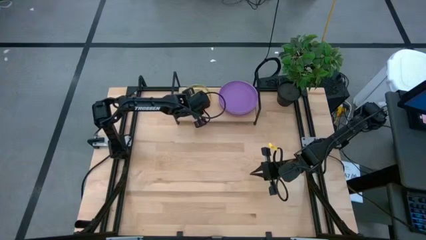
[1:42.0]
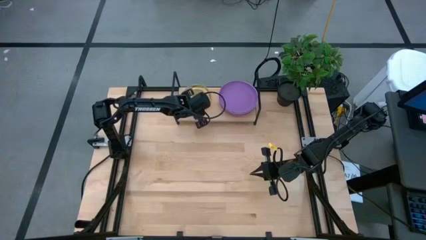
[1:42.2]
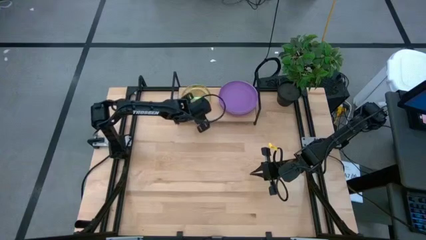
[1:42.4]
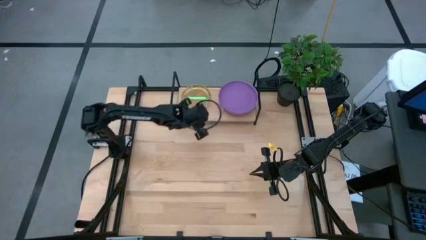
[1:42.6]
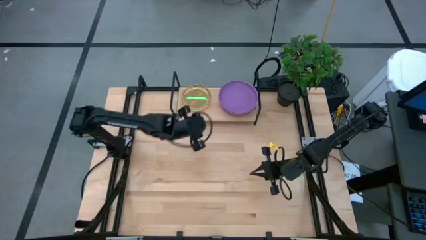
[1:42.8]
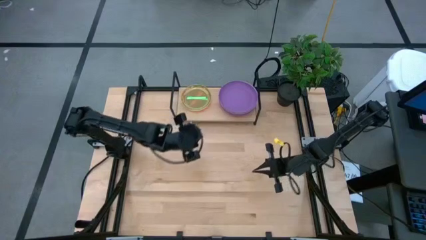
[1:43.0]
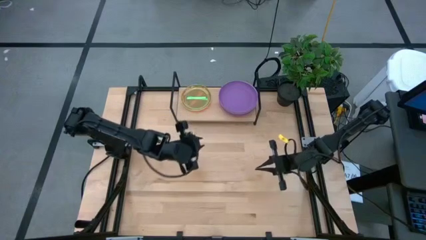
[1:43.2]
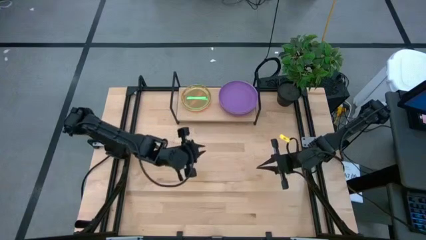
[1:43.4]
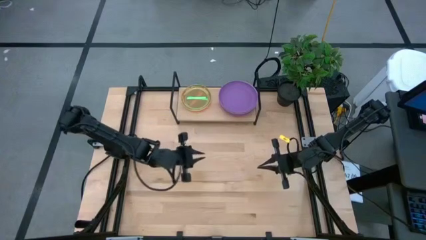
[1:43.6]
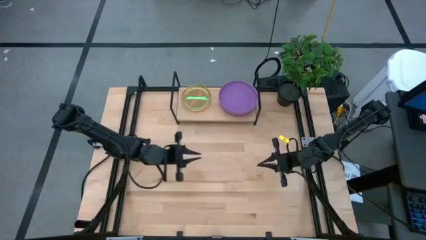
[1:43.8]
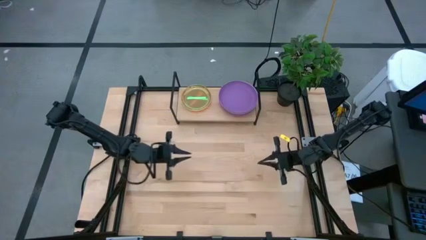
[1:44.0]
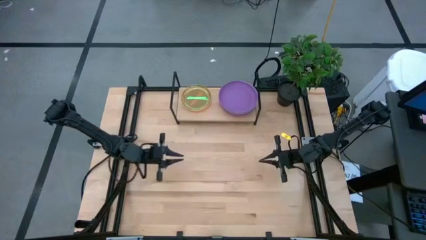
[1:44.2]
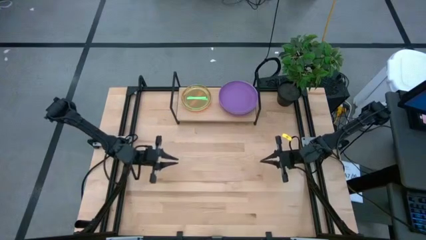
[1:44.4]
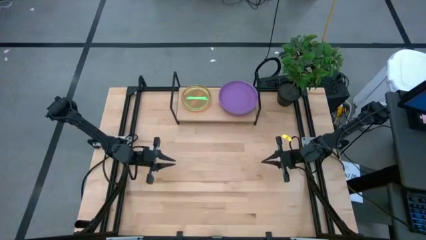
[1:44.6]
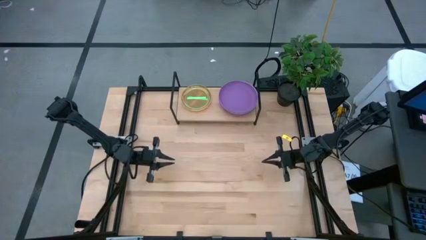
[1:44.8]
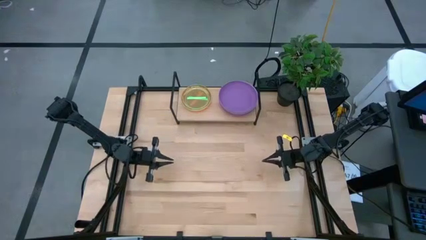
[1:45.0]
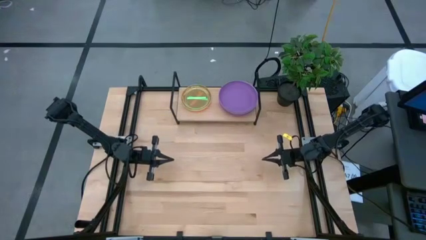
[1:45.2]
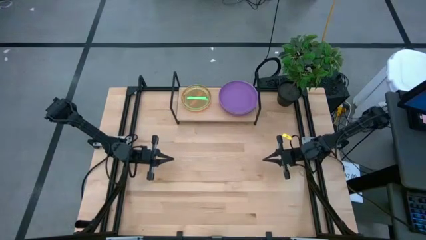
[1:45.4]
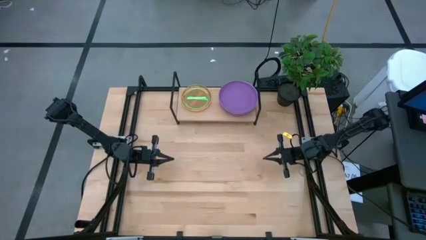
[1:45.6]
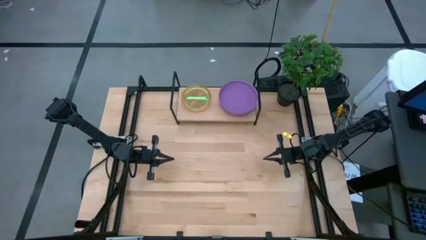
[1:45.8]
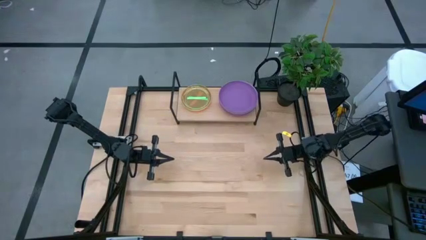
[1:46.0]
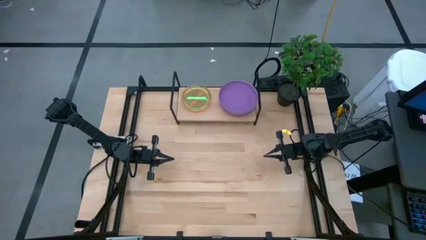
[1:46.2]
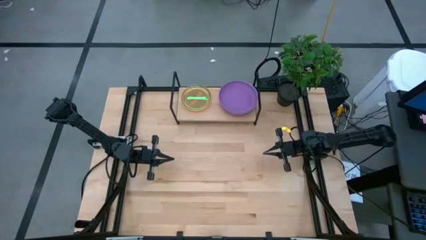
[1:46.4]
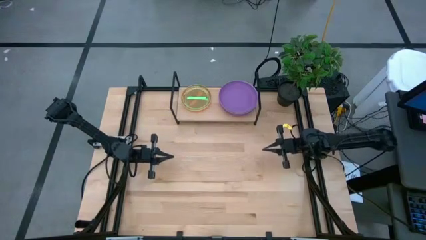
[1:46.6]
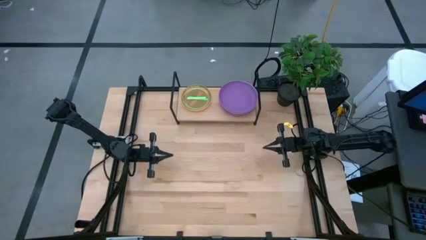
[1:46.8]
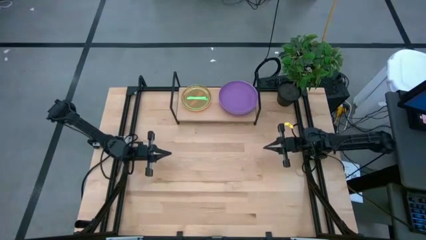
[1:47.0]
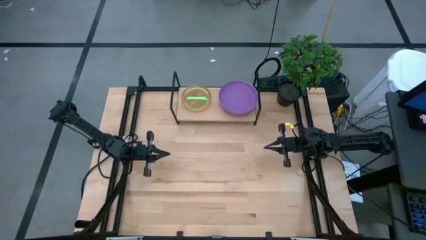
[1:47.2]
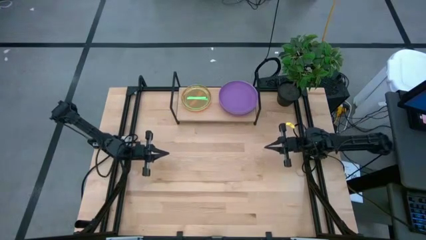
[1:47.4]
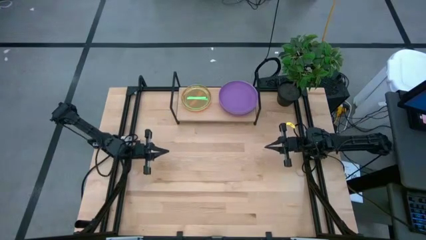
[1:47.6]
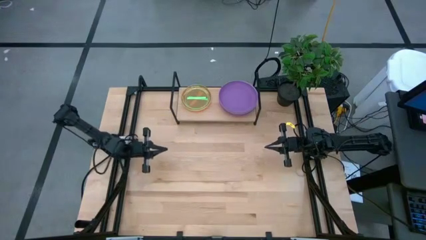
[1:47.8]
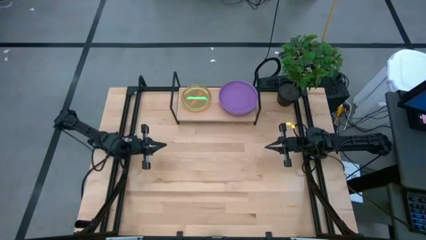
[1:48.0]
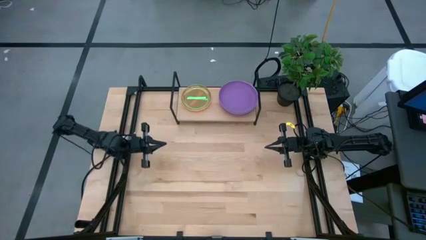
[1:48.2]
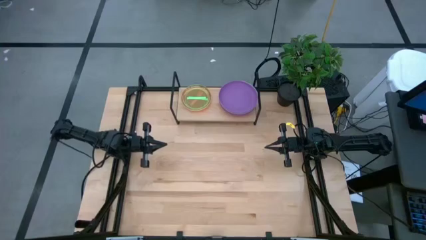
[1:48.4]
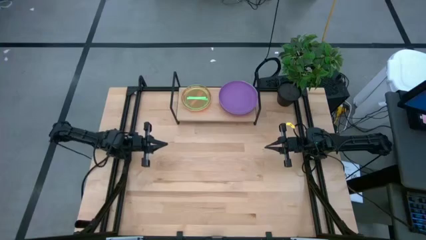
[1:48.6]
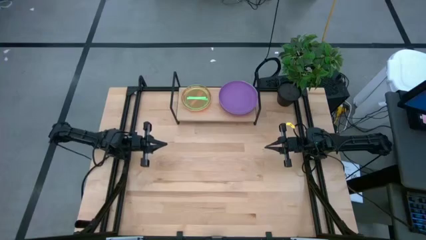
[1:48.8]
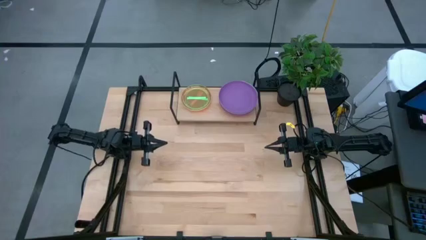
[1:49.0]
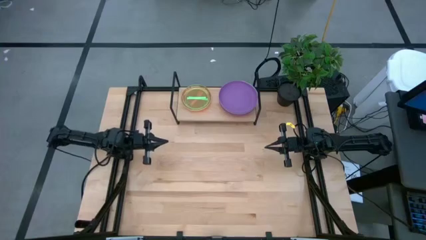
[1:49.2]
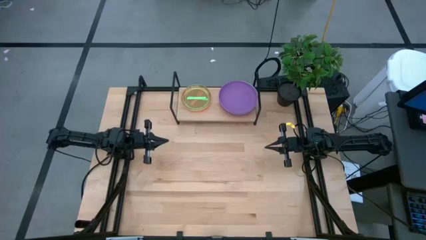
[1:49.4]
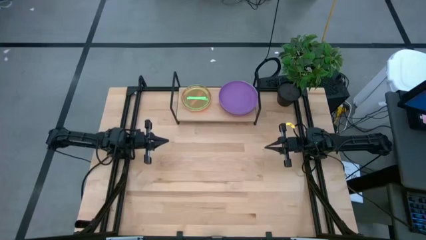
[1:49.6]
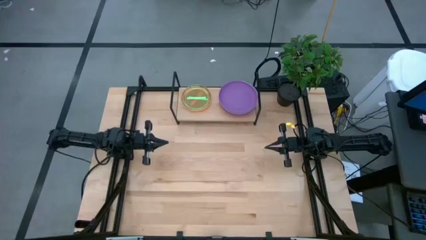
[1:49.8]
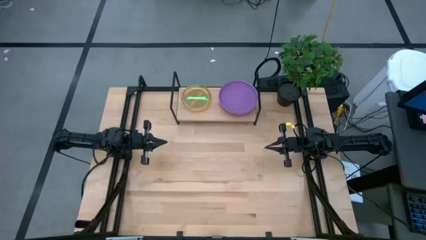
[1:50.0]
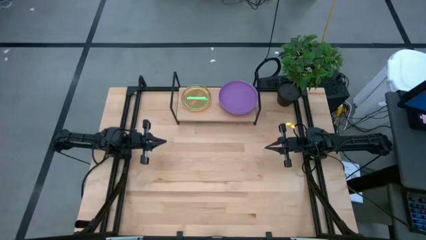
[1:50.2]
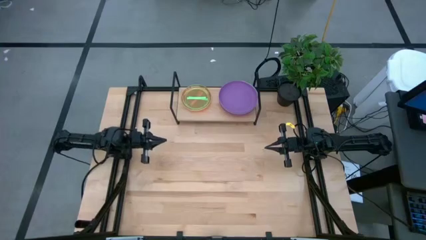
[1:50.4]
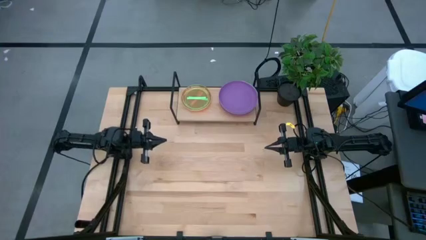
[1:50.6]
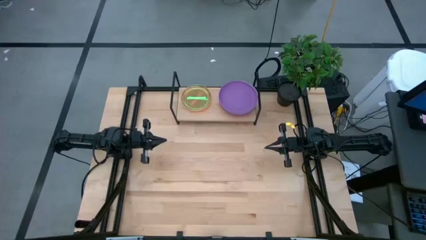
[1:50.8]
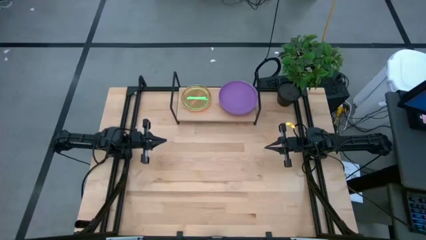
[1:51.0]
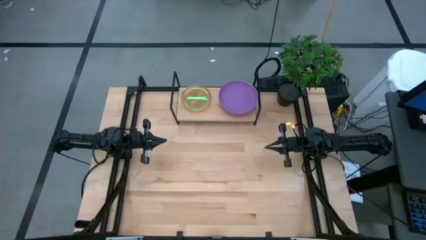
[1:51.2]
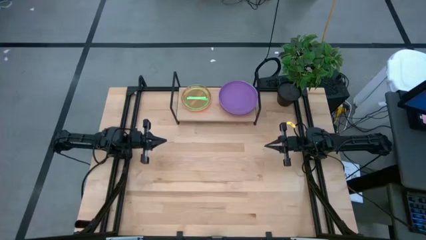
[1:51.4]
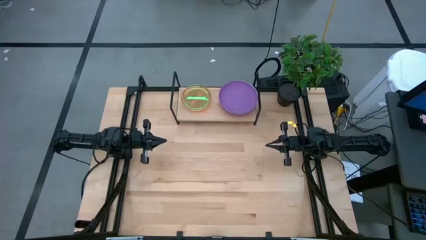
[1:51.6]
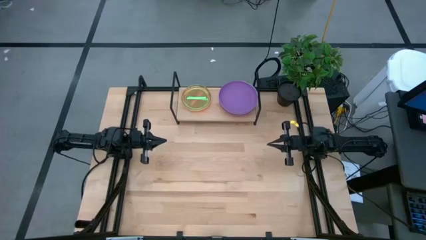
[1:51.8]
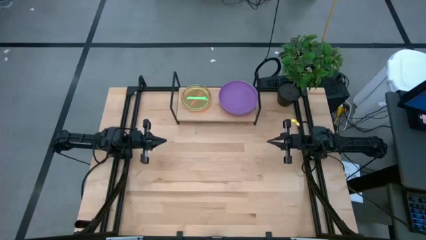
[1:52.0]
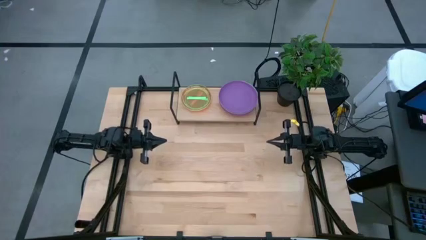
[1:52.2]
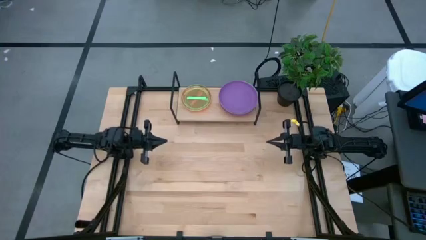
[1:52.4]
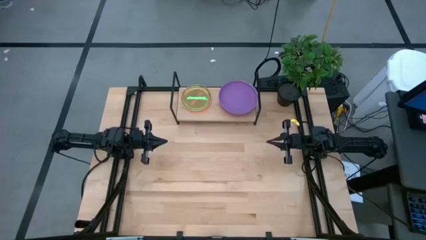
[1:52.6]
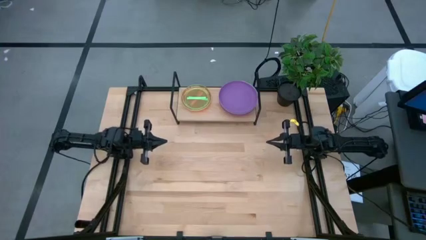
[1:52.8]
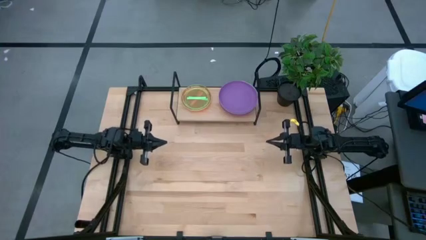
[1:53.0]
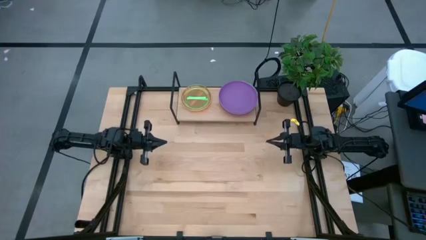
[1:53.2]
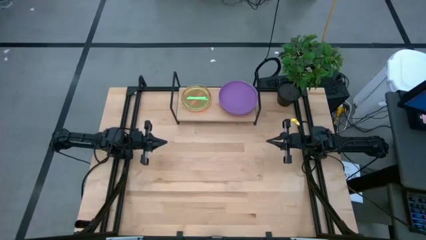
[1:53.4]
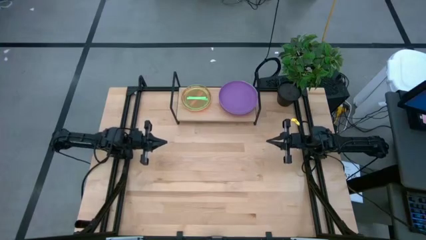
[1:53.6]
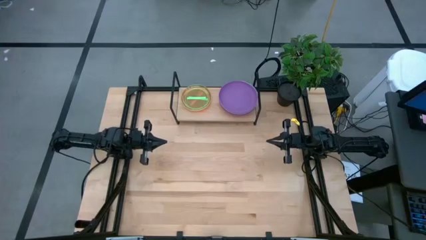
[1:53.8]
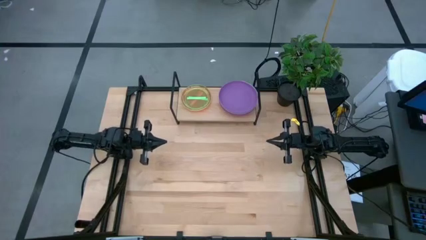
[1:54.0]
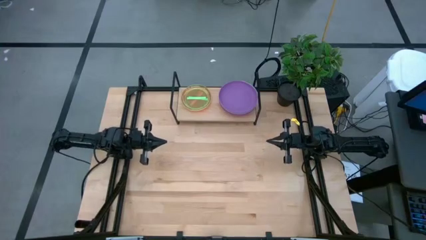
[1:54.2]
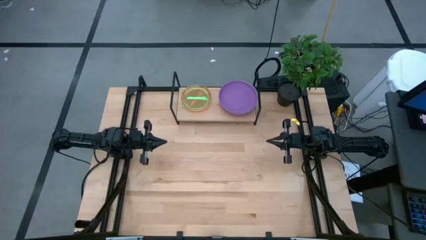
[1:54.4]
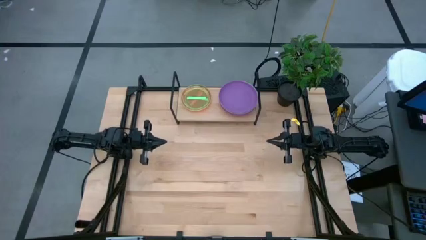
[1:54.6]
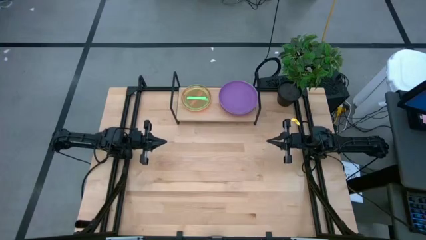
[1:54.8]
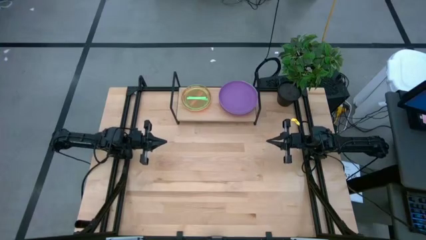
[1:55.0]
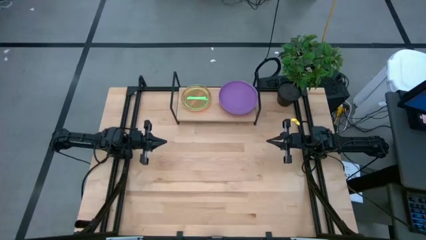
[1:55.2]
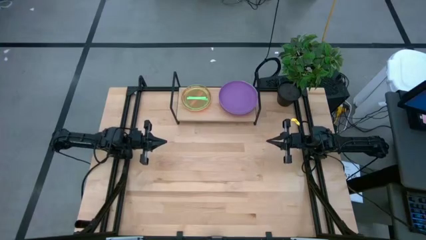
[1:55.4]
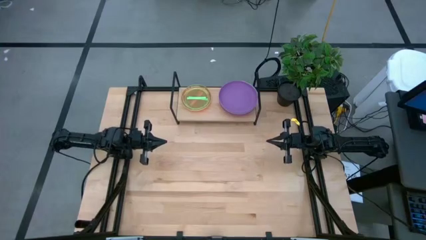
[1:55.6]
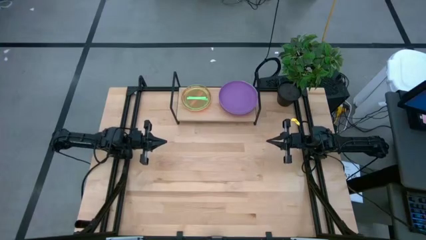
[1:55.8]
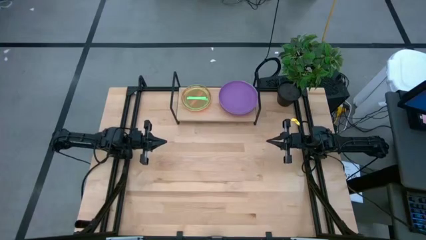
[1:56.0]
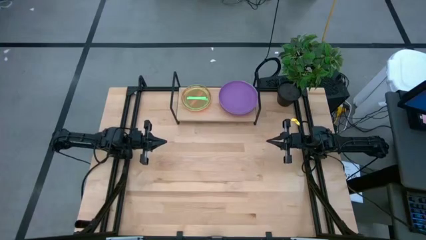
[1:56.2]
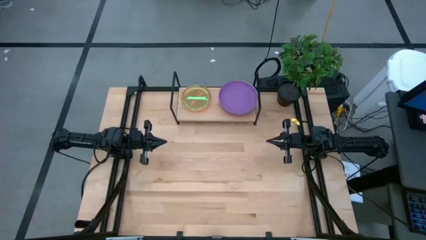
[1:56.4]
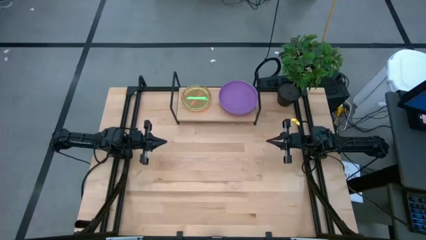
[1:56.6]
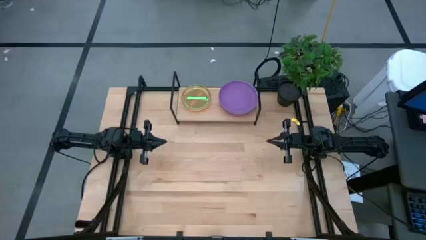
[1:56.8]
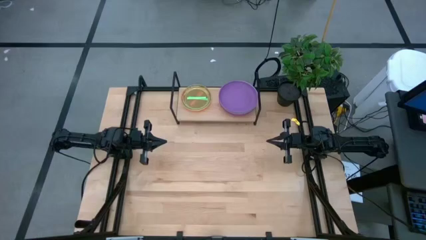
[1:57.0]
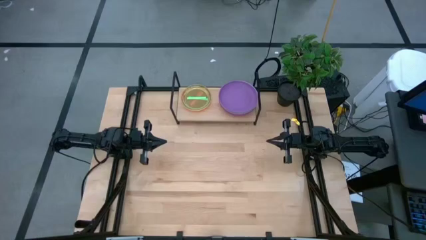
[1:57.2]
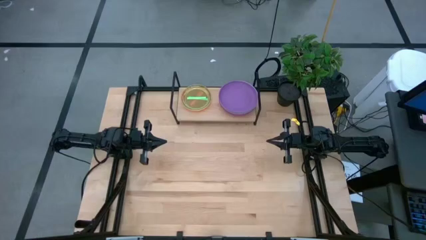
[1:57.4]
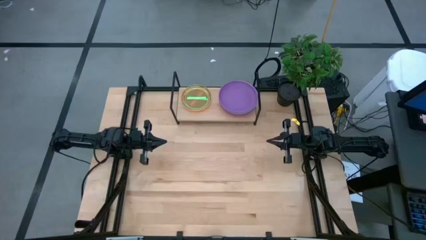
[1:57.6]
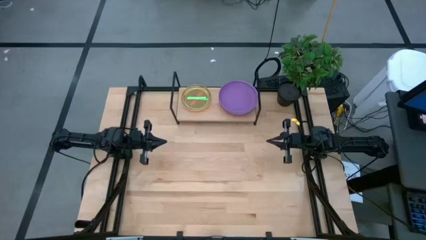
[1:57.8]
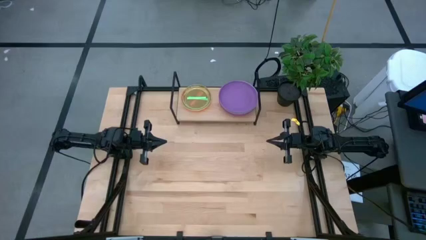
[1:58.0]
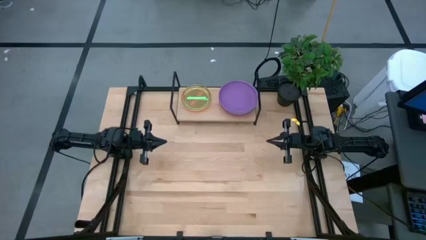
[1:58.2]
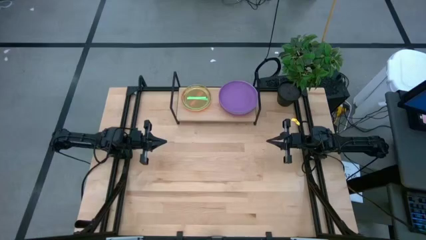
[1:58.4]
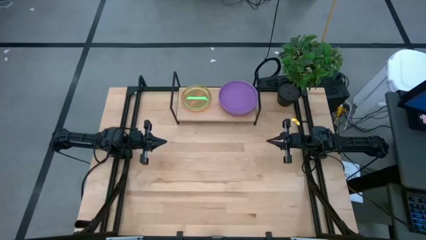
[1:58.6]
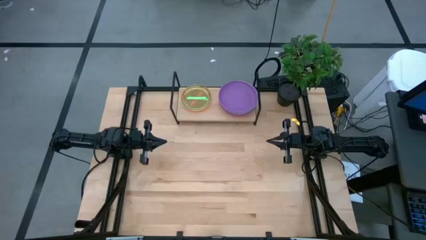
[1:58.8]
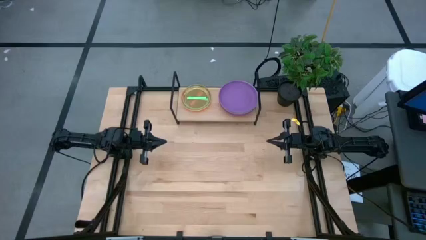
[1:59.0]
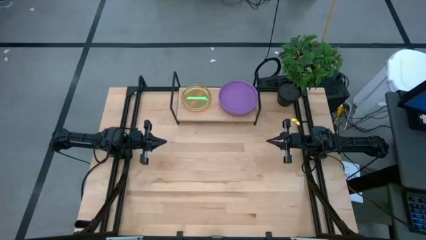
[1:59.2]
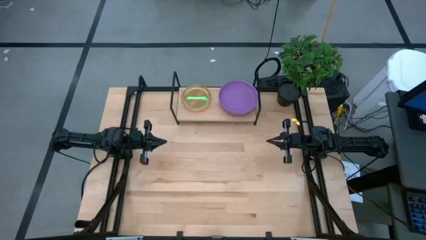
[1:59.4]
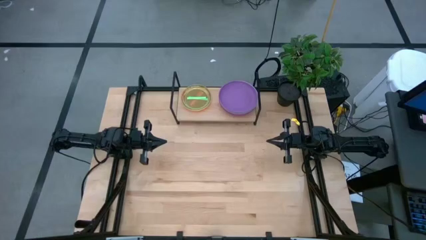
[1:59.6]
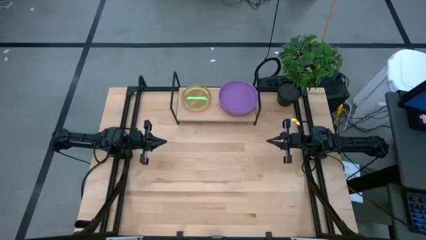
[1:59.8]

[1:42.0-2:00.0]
Task: Place and stack plates onto a shelf
Return to Home Position
